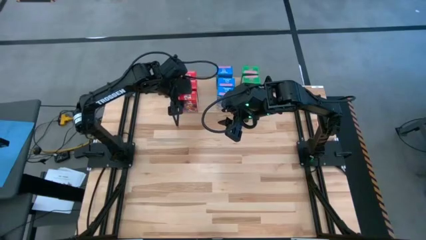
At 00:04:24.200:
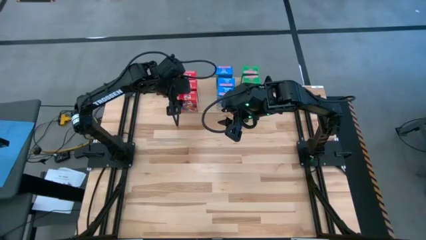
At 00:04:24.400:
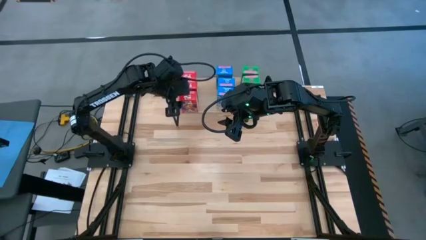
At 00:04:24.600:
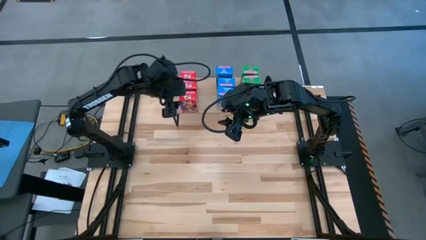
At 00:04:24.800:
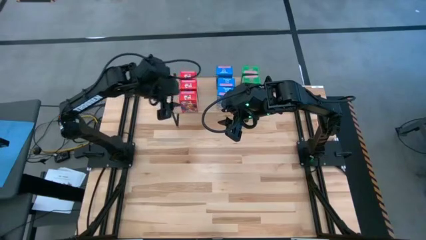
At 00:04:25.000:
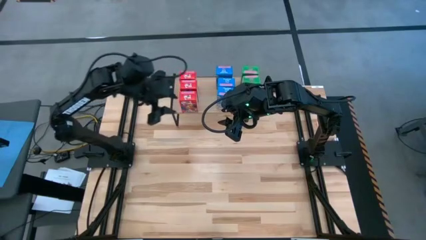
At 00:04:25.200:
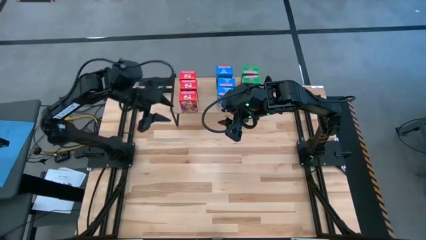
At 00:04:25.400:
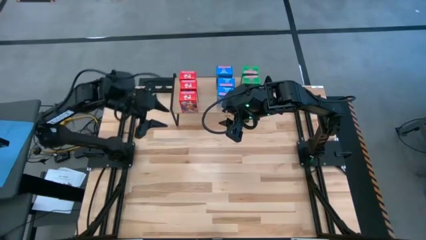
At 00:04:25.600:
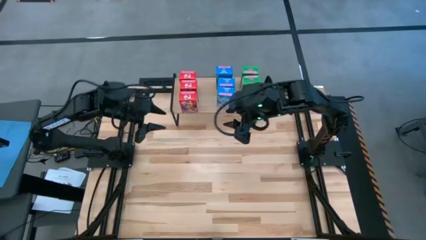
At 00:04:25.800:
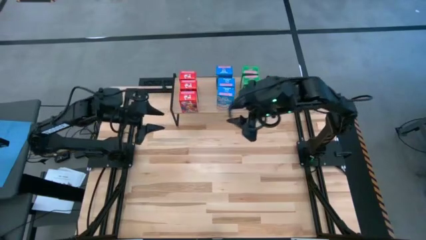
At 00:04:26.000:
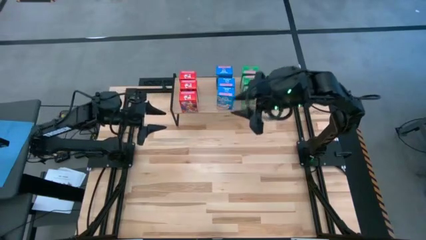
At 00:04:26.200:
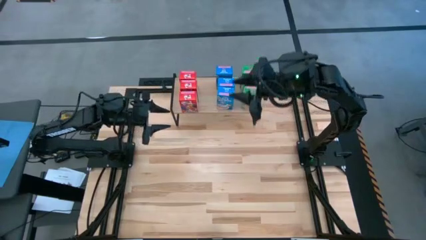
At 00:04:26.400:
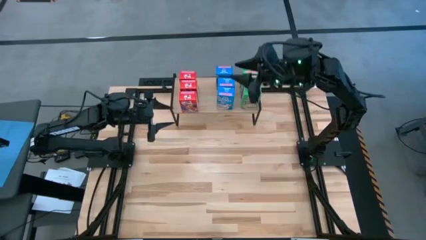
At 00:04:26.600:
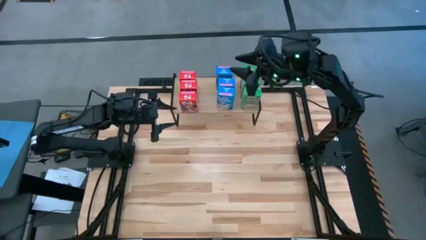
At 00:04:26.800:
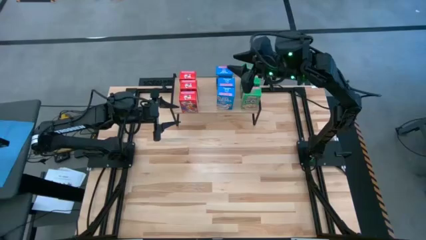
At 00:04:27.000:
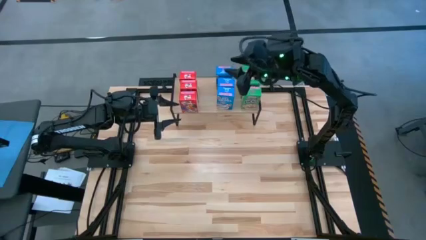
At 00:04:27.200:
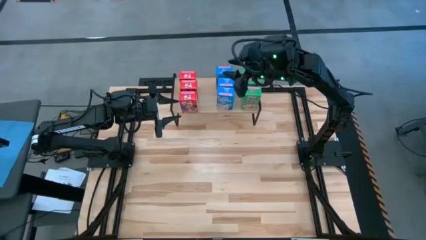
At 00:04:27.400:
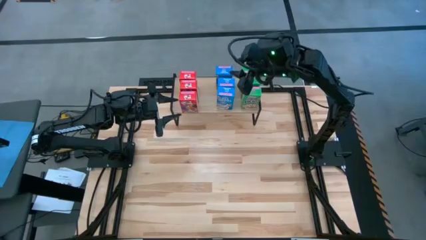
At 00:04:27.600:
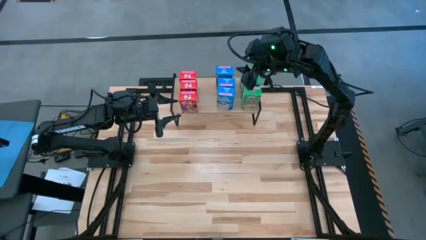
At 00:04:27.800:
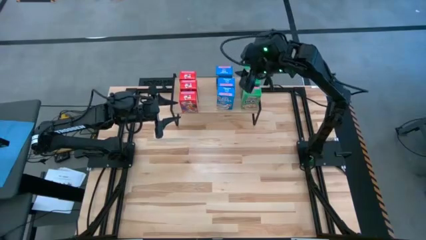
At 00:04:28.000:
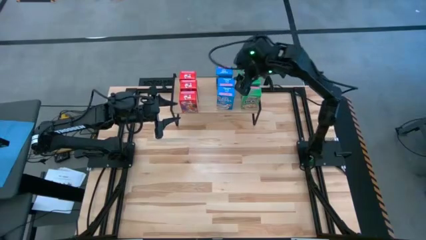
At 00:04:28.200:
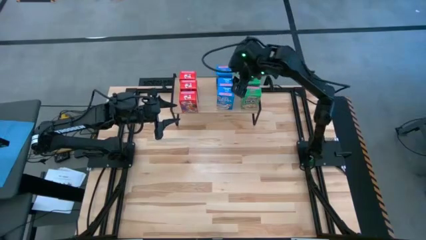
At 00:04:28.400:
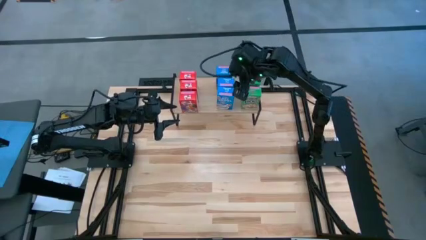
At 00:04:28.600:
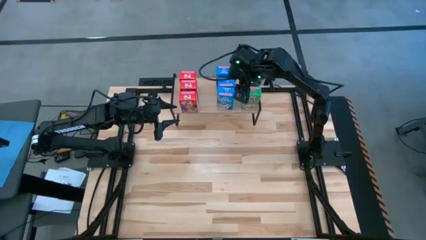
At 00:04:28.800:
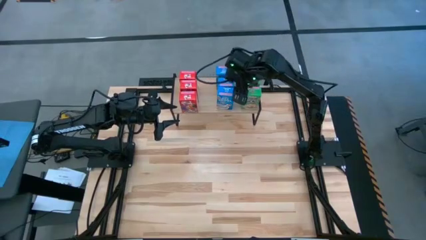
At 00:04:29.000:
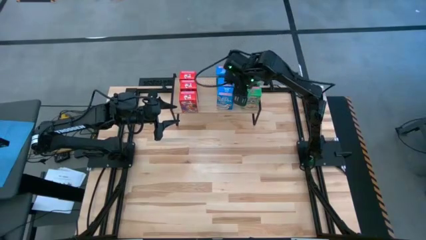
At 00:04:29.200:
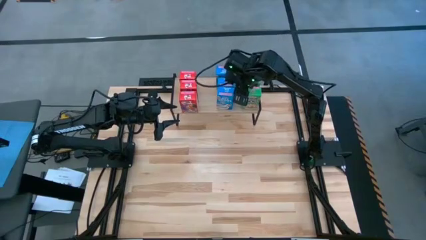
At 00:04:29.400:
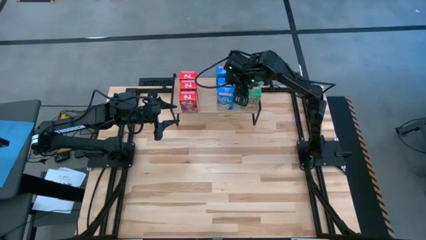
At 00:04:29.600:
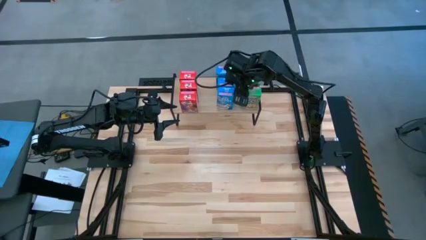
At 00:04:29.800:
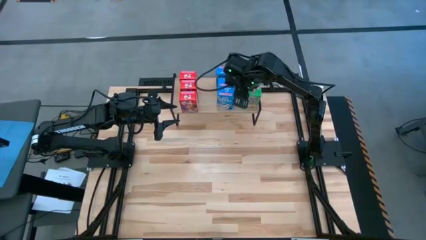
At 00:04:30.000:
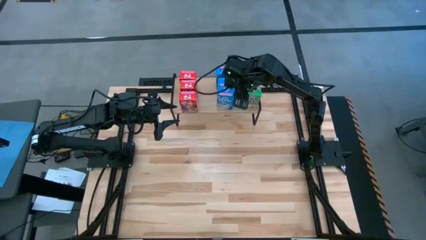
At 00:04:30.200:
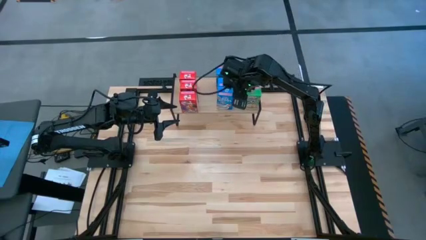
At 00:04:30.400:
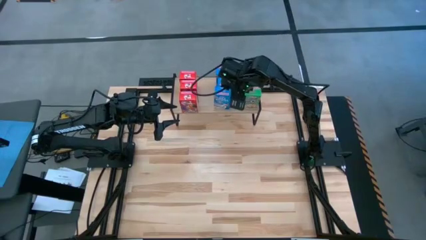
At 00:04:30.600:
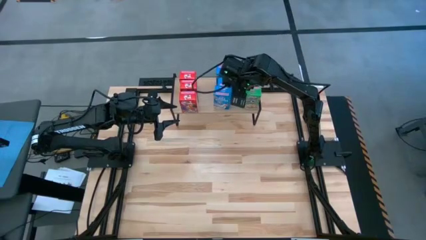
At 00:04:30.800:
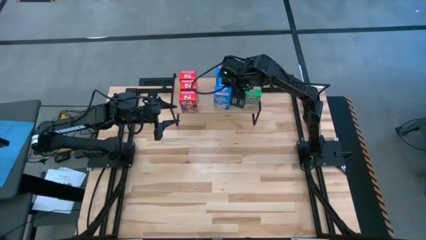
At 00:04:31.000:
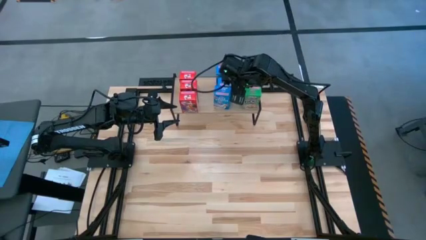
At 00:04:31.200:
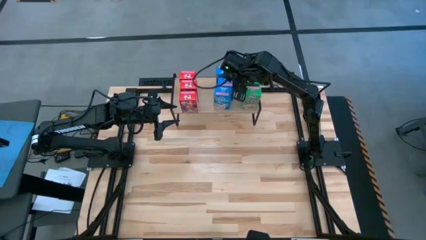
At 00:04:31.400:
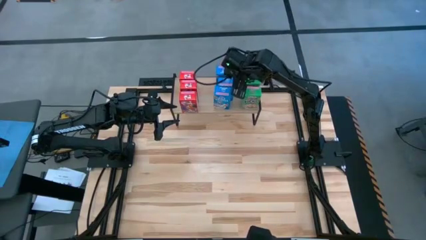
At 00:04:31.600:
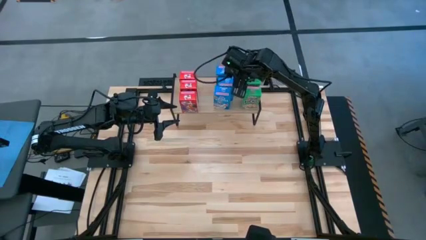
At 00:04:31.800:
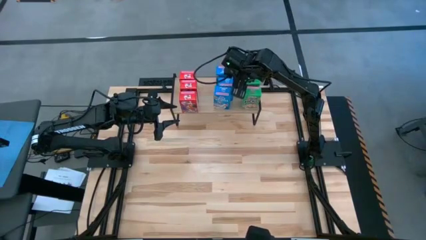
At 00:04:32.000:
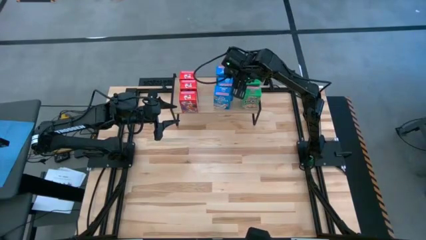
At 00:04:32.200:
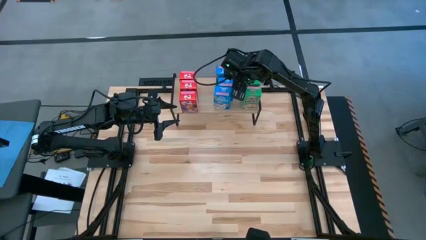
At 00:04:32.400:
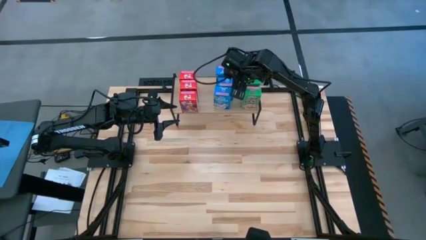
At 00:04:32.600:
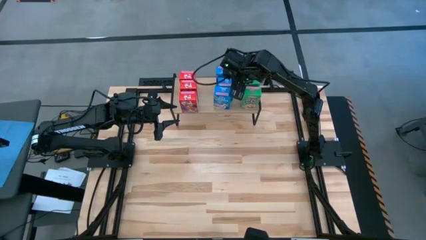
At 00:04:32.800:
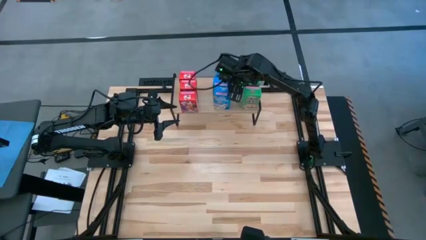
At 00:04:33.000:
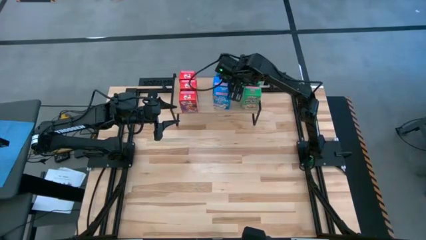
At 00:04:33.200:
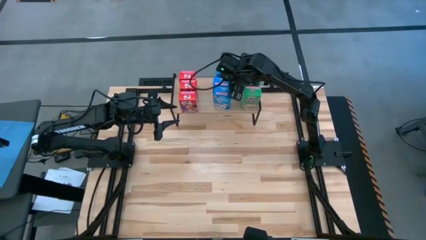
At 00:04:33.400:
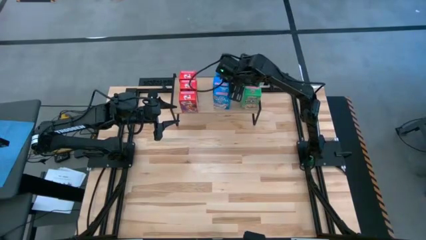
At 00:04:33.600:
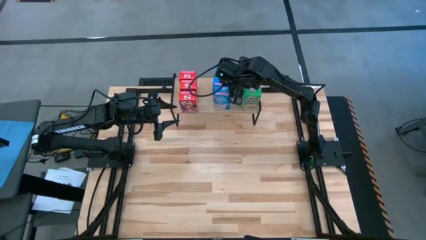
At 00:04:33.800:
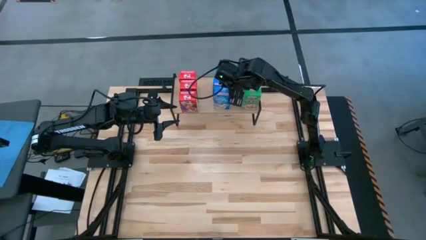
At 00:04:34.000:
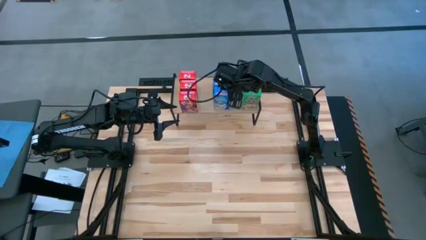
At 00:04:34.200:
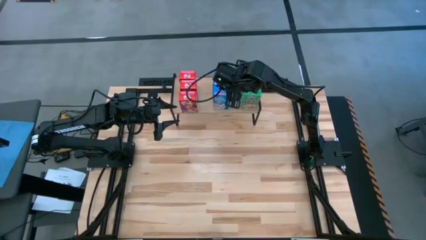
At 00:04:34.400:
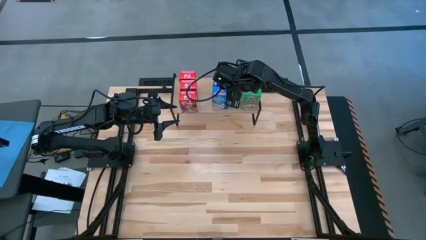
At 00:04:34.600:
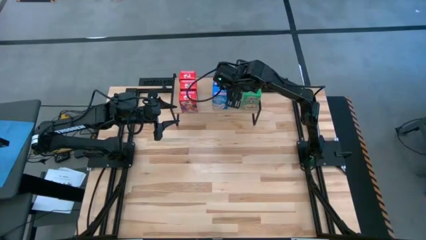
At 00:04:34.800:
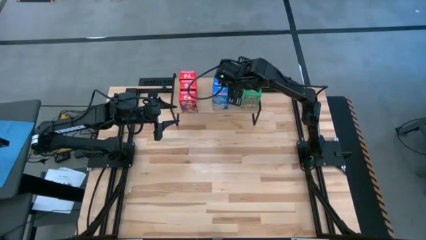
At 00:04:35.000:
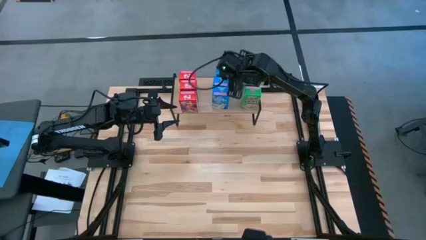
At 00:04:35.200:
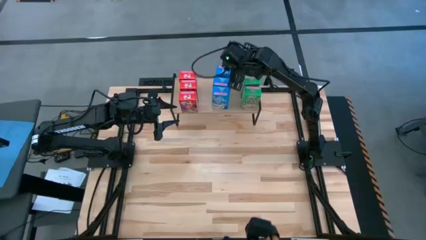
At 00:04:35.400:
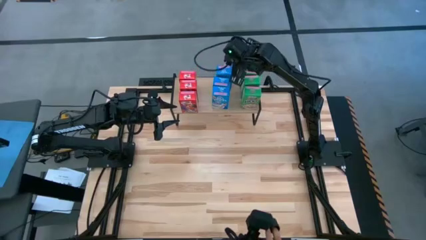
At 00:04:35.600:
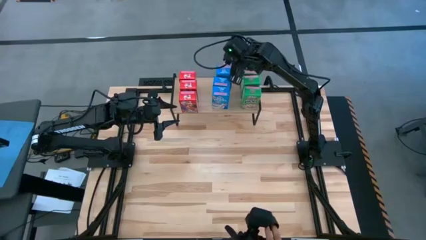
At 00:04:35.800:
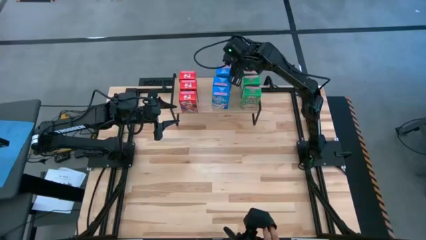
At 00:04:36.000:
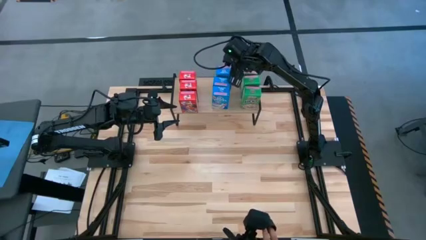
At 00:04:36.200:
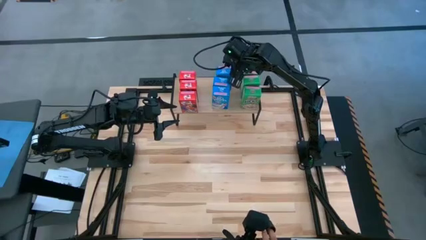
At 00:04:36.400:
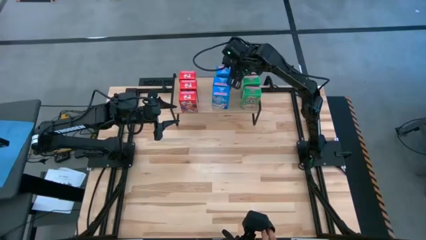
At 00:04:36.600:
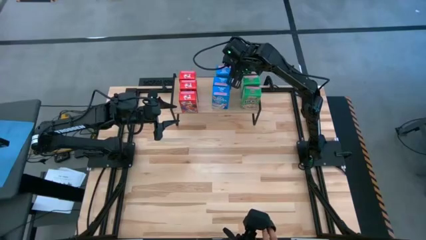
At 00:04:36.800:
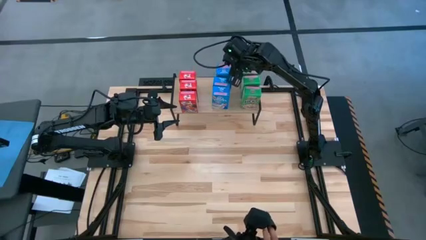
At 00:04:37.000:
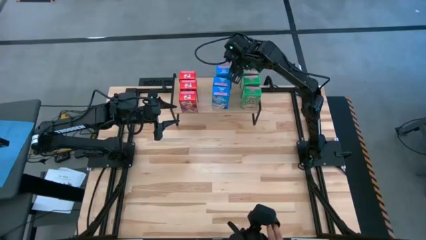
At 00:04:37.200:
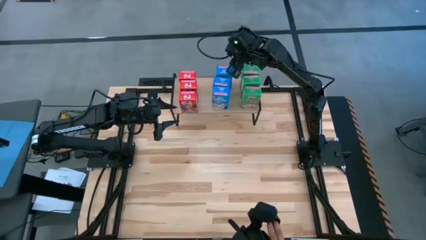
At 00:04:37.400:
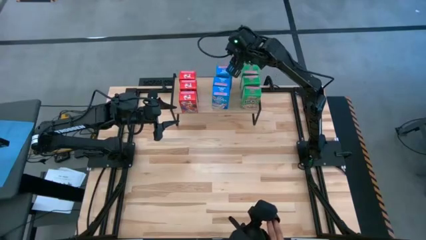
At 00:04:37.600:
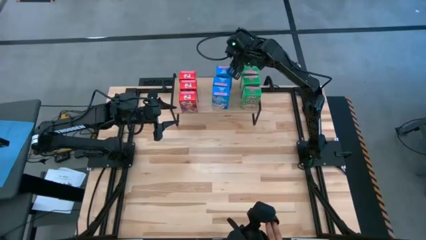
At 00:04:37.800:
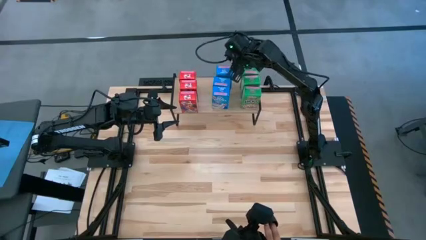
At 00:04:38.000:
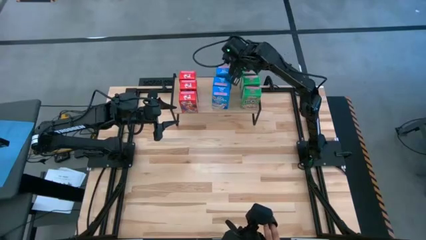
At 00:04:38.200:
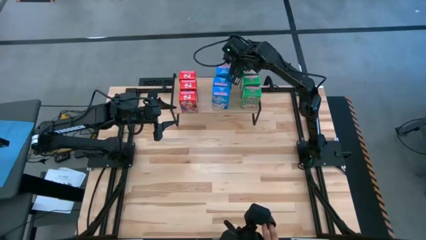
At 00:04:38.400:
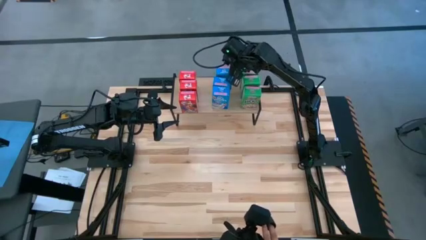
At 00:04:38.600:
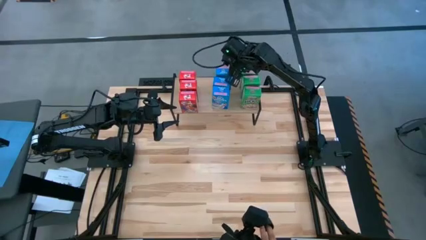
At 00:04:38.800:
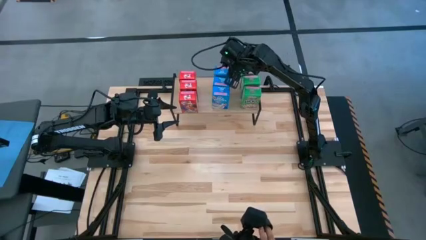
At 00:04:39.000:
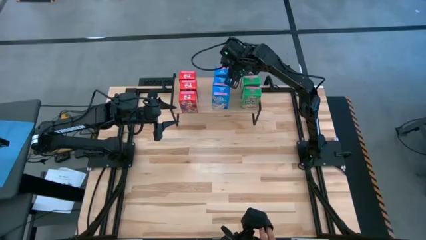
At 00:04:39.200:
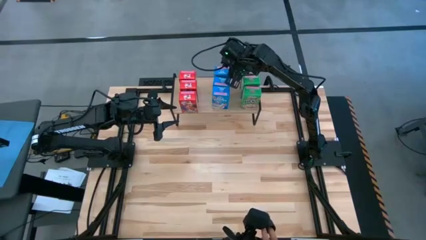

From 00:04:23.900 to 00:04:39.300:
Task: Stack cereal on shelf
Adjust the blue cereal boxes on the shelf
